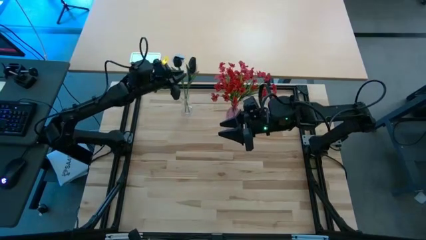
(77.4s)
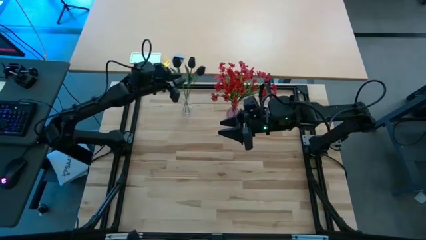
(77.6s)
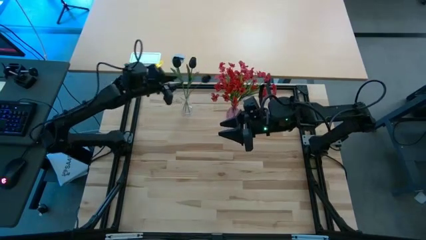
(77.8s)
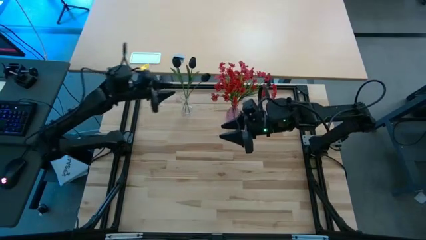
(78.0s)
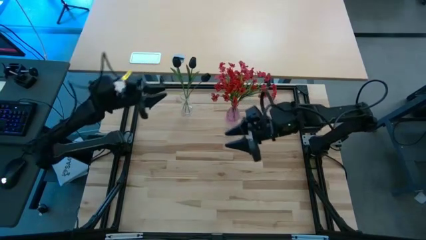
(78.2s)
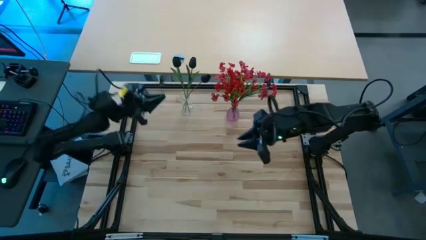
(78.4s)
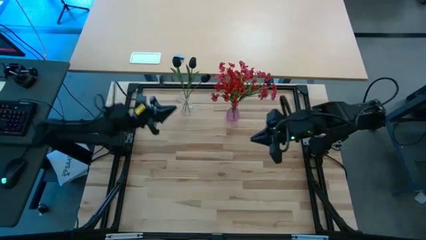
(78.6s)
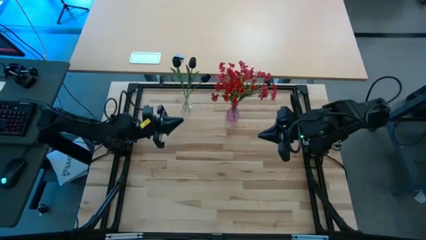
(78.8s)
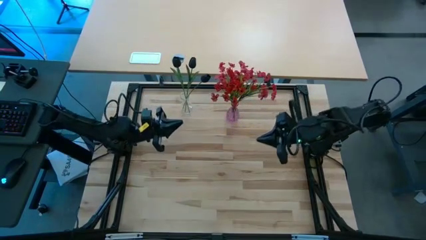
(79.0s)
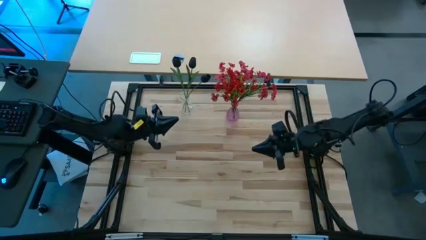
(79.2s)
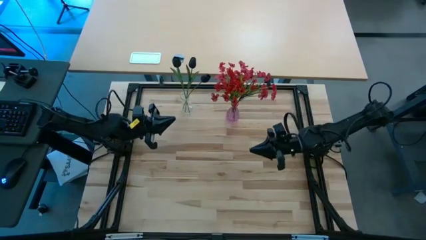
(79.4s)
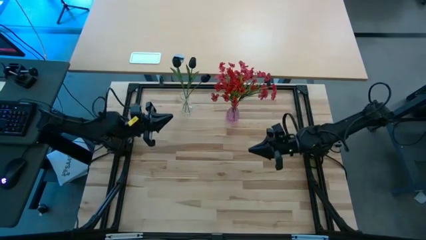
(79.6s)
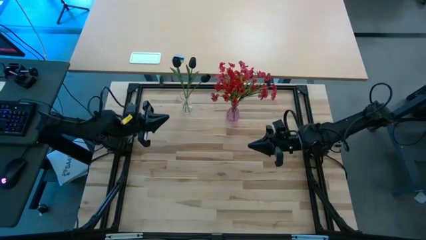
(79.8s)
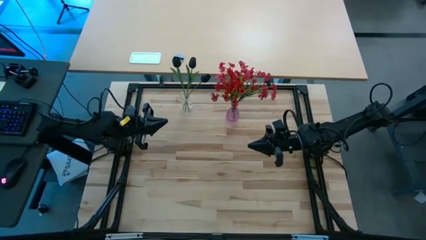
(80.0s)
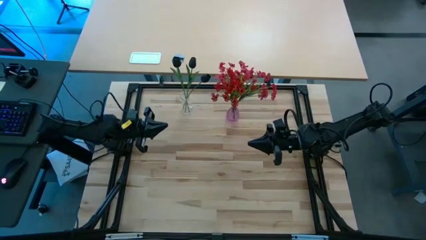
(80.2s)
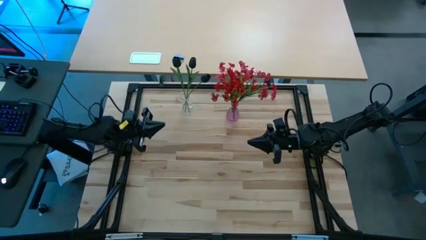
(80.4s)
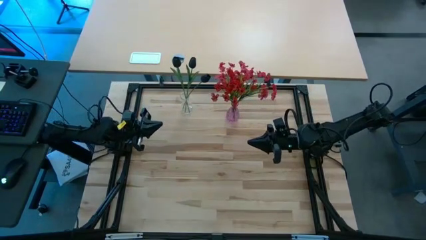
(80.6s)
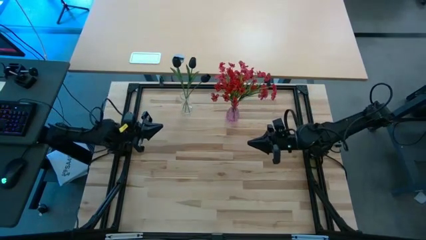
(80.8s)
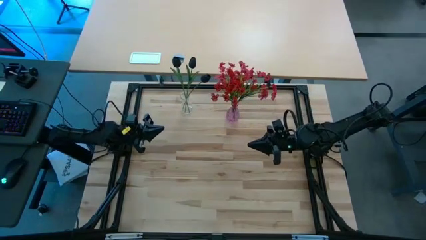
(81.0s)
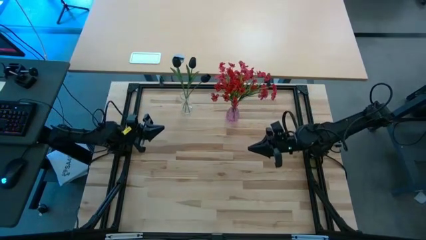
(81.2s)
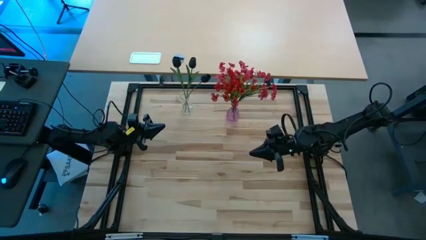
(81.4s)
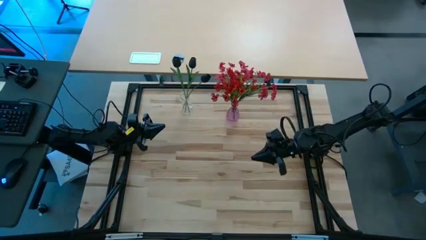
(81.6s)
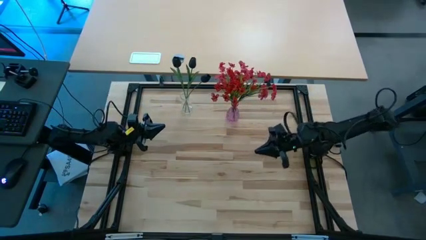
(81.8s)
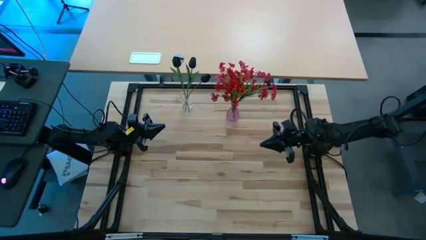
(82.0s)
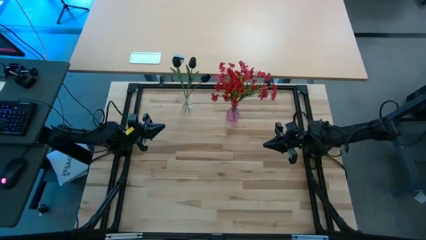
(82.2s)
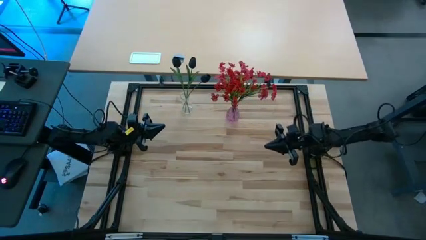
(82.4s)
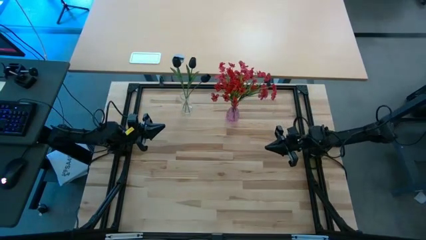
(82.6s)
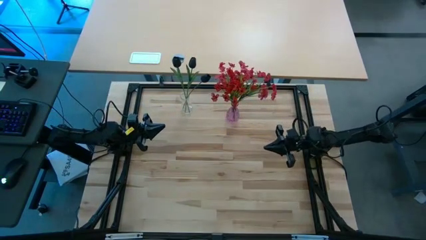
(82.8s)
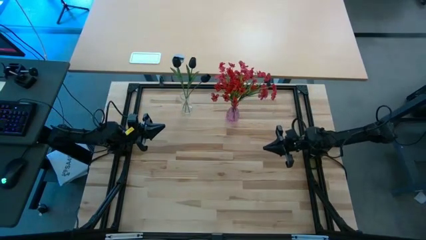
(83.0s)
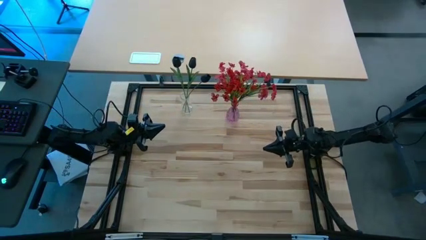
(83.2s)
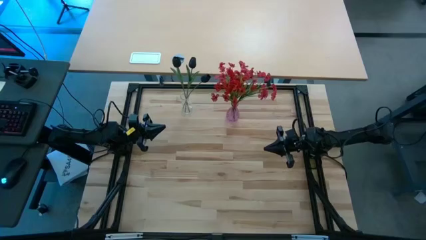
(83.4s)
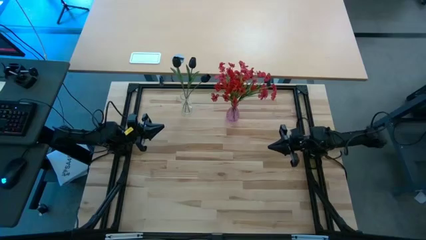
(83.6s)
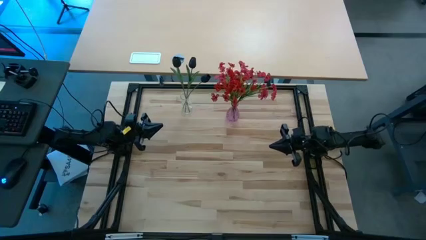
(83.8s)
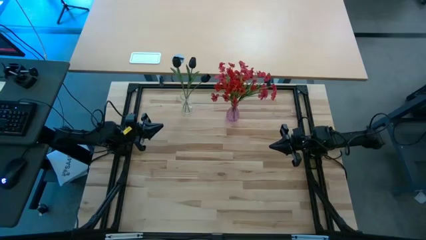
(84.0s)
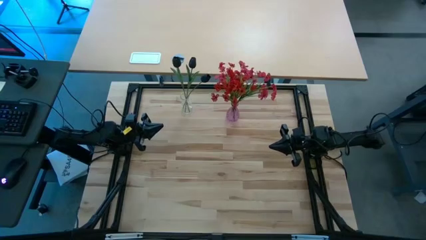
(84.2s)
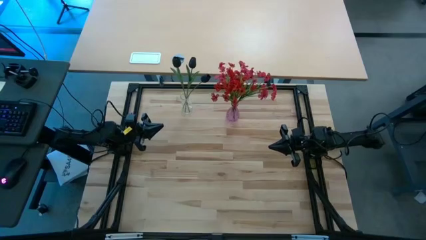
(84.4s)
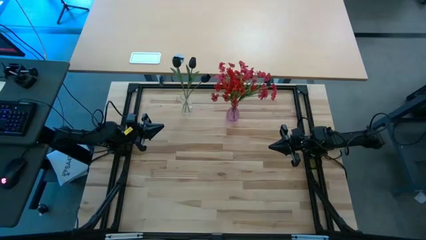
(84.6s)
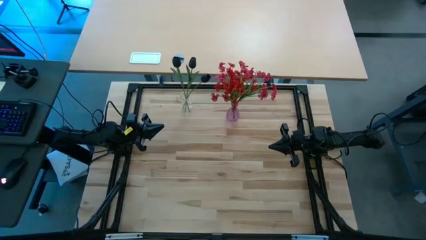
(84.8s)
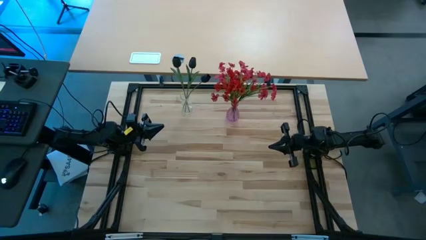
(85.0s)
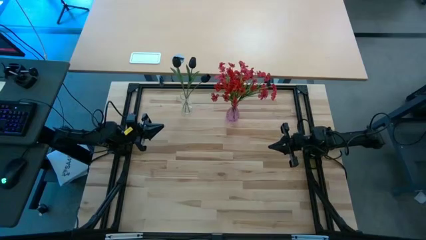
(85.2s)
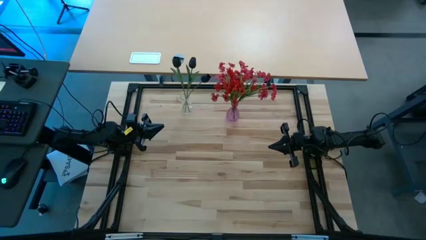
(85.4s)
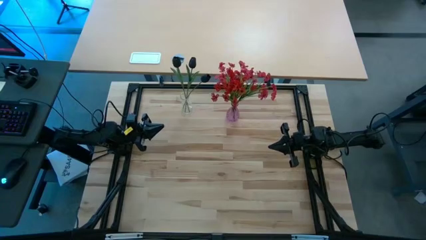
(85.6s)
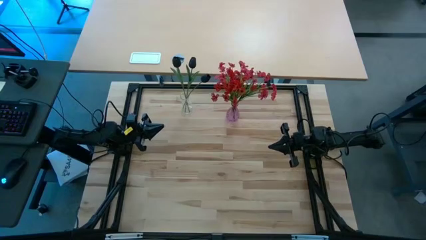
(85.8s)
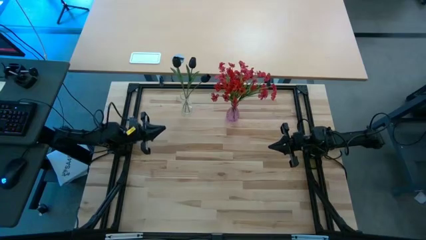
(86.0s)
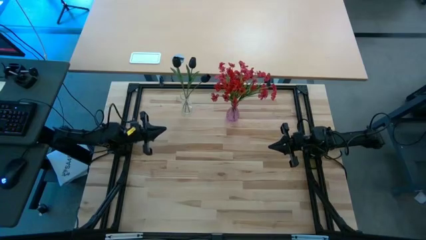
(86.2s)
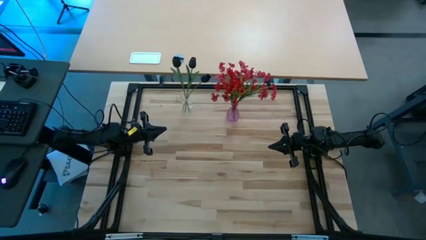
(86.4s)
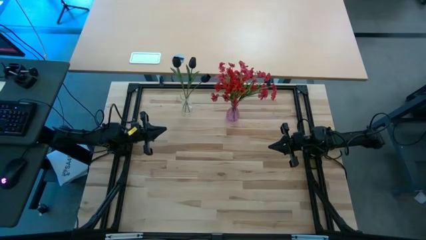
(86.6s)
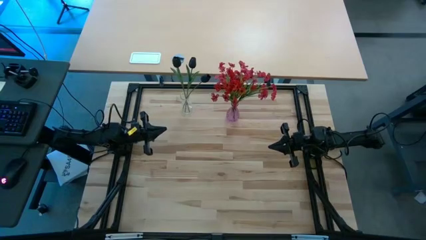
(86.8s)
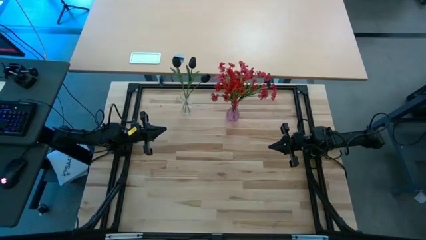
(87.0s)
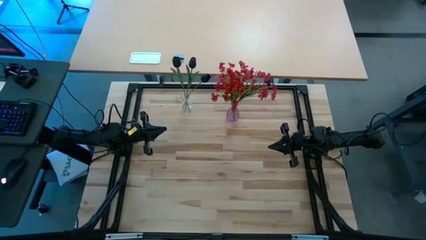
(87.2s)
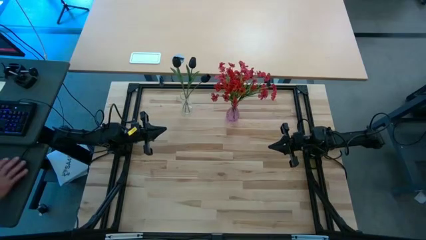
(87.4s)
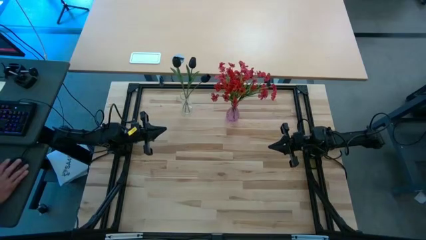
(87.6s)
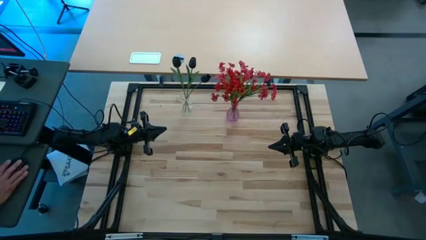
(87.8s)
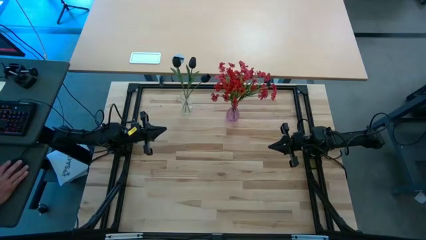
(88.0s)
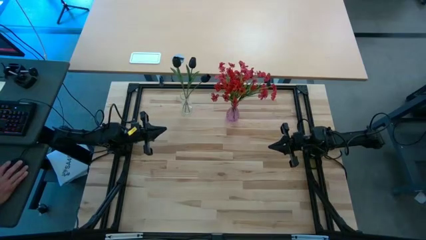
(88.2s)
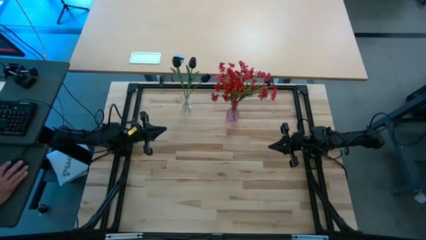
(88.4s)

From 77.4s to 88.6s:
Task: Sort flowers into vase by color
Return to Home Position
